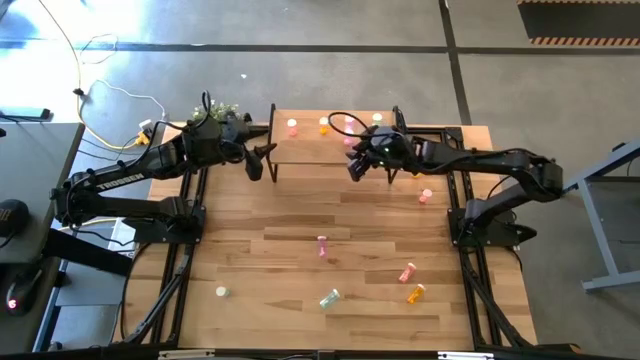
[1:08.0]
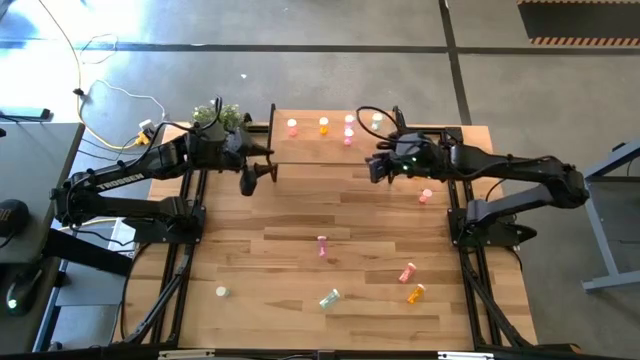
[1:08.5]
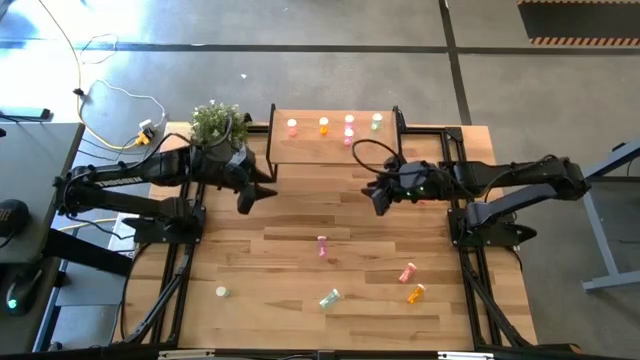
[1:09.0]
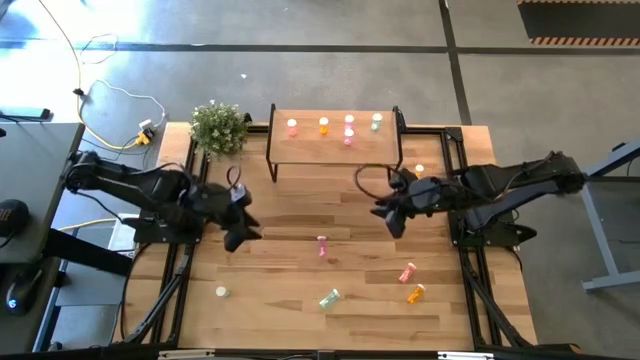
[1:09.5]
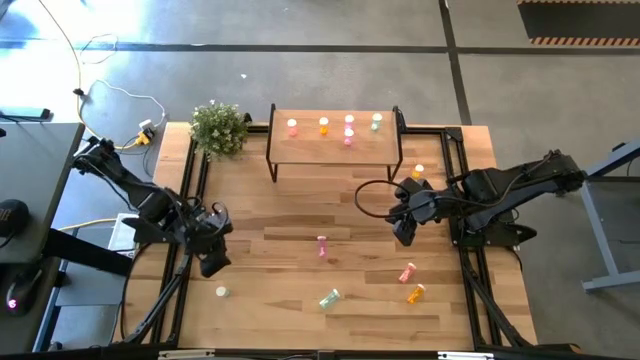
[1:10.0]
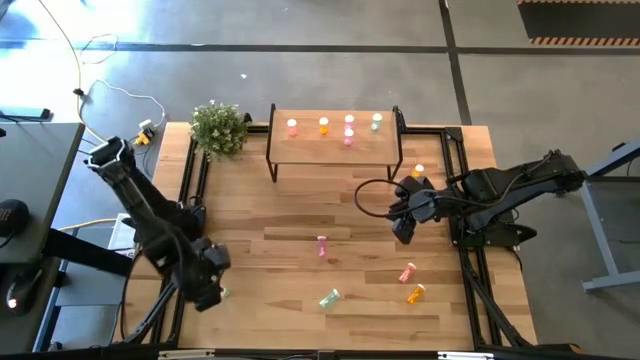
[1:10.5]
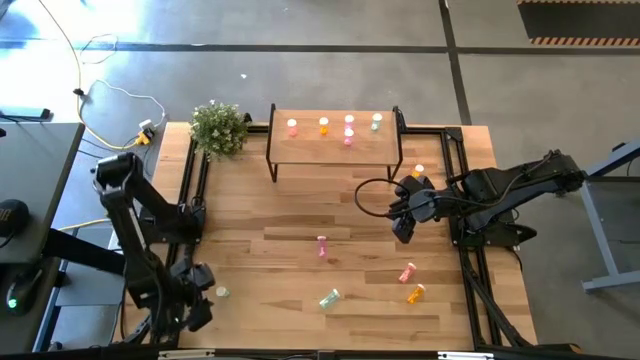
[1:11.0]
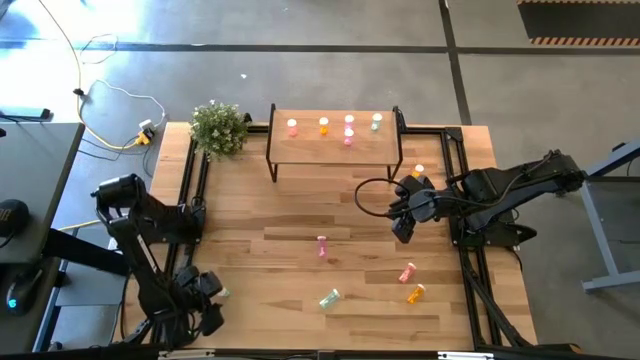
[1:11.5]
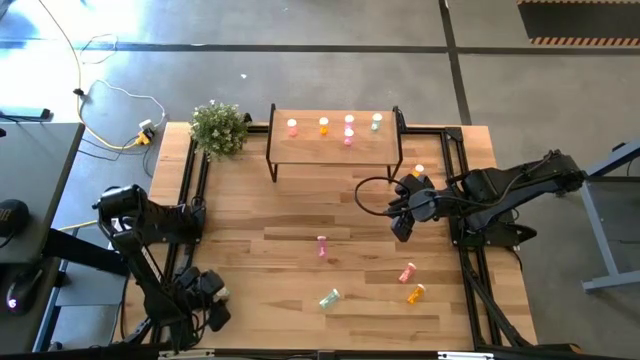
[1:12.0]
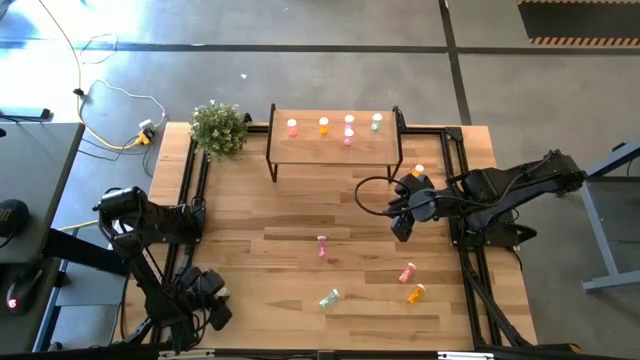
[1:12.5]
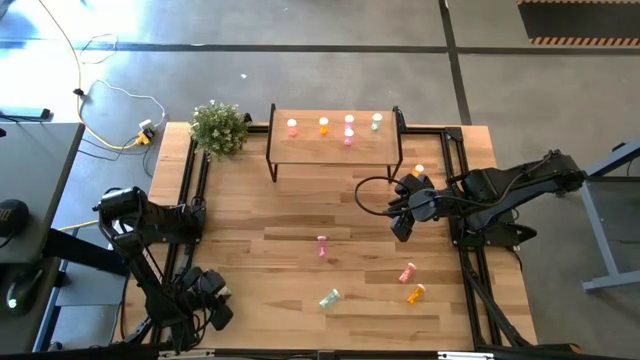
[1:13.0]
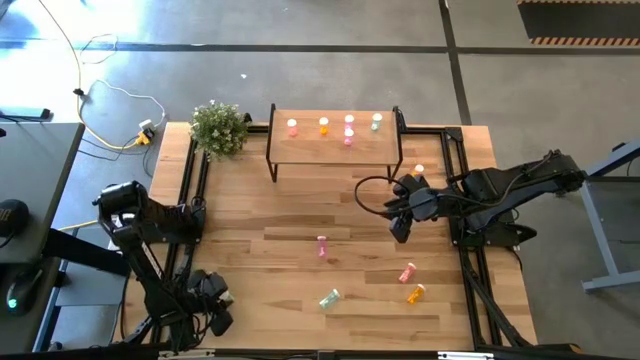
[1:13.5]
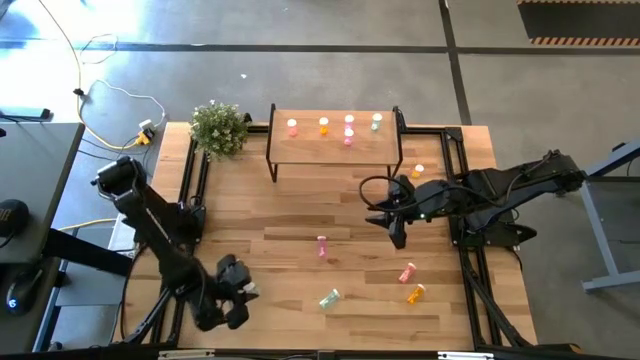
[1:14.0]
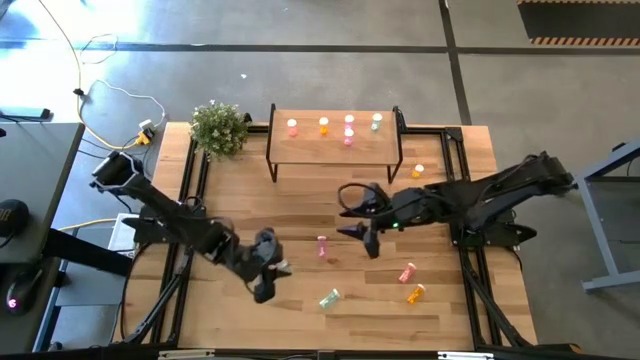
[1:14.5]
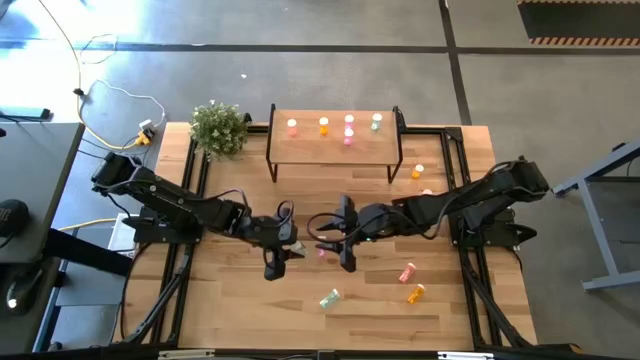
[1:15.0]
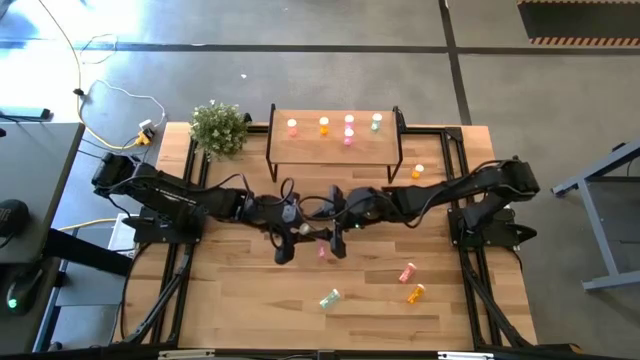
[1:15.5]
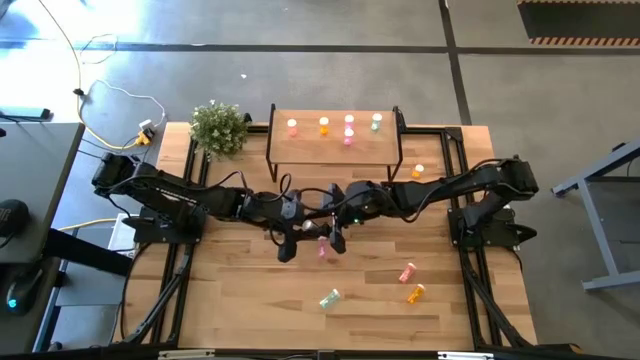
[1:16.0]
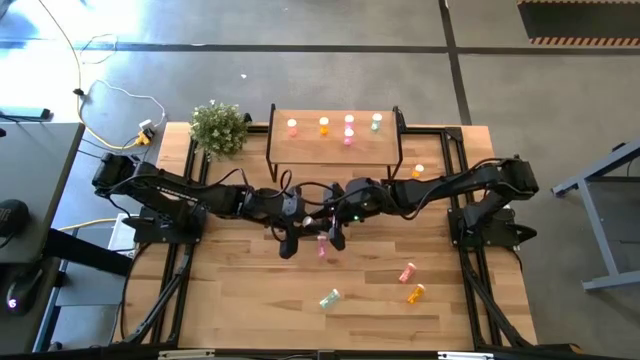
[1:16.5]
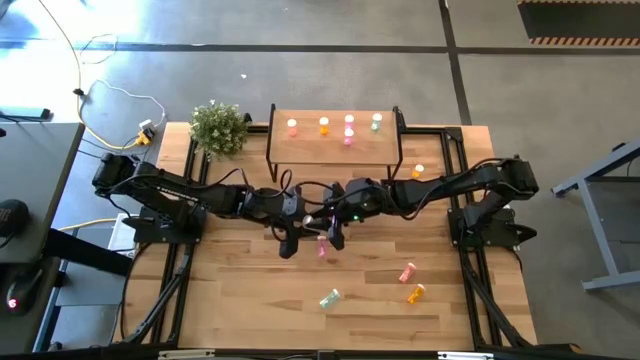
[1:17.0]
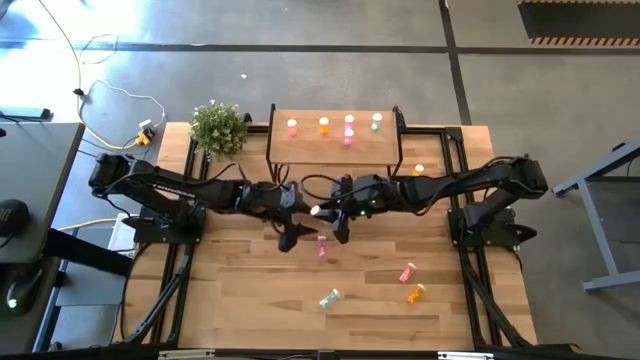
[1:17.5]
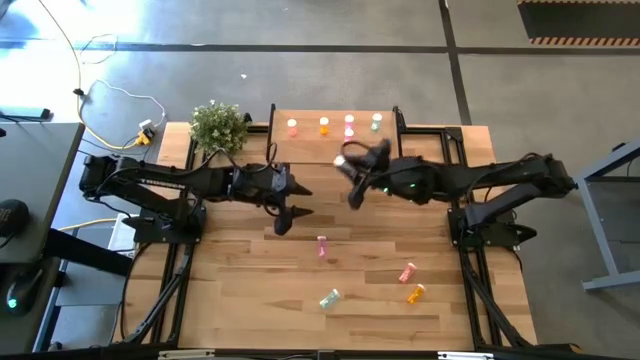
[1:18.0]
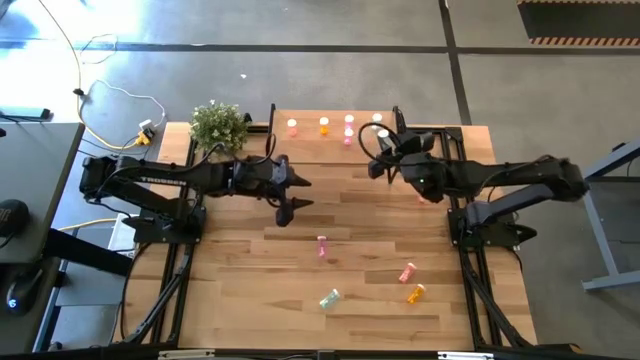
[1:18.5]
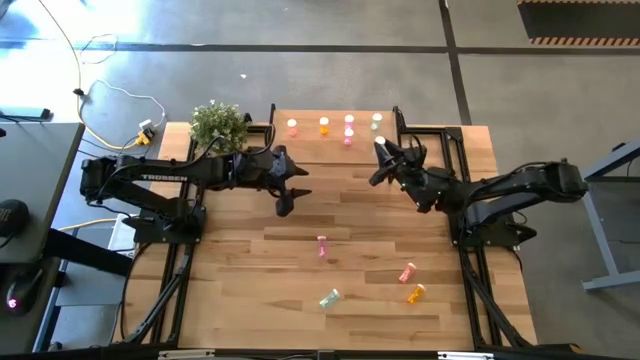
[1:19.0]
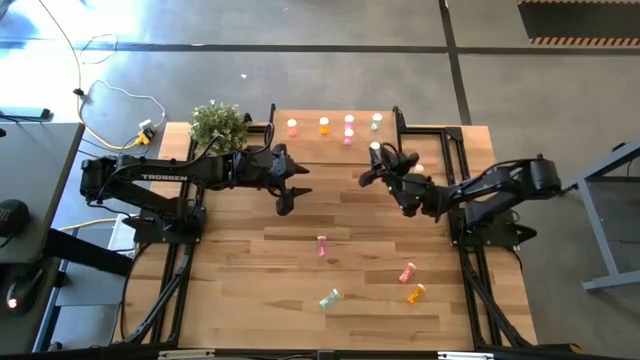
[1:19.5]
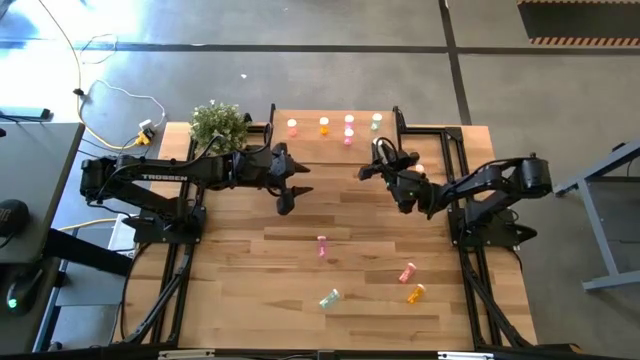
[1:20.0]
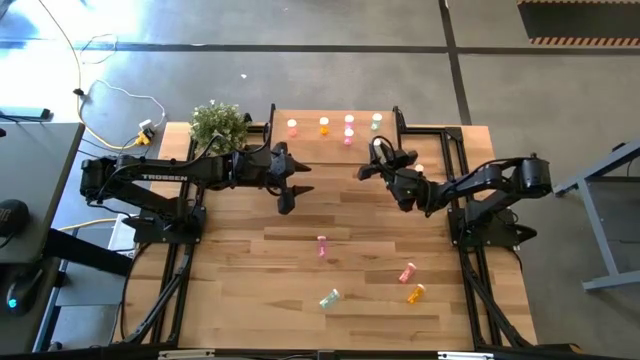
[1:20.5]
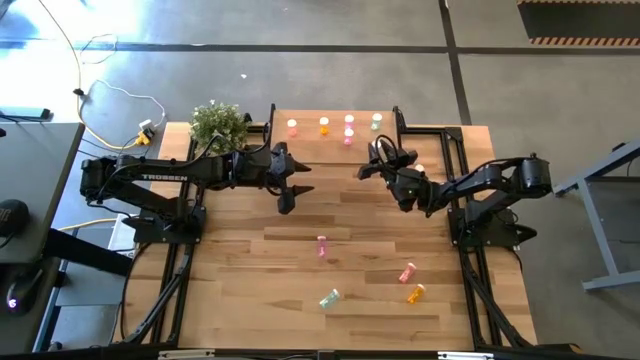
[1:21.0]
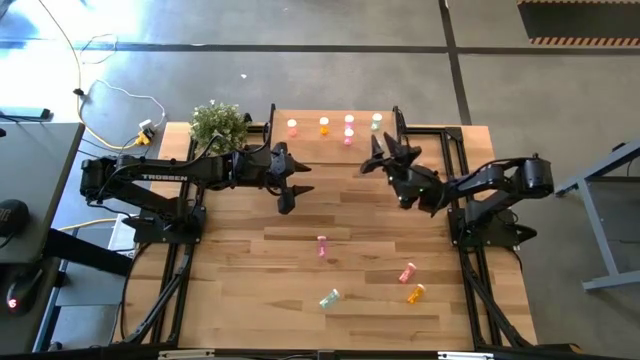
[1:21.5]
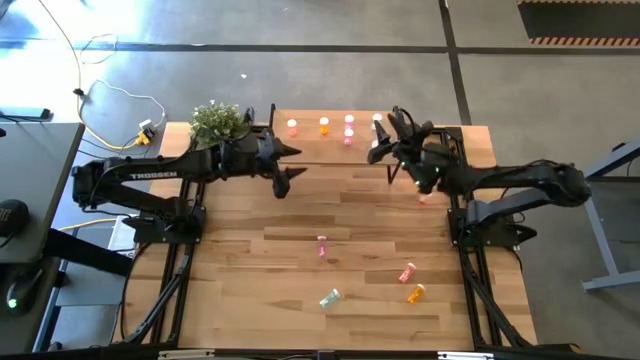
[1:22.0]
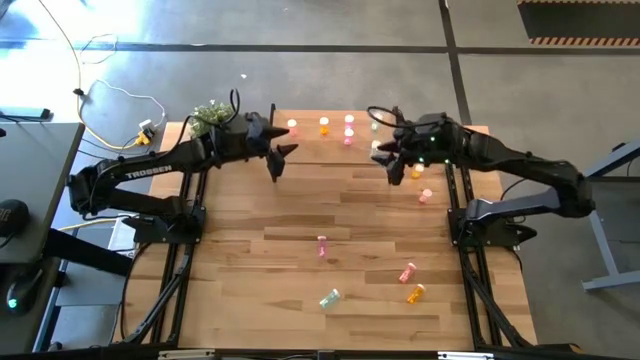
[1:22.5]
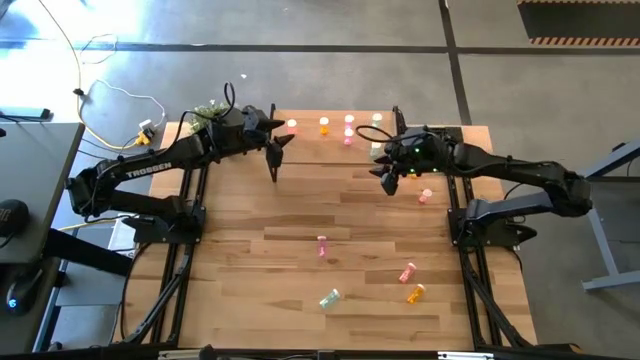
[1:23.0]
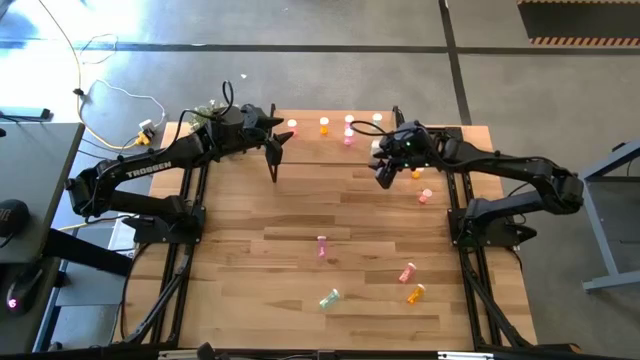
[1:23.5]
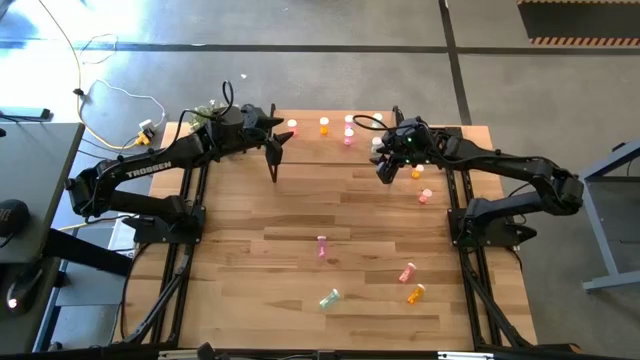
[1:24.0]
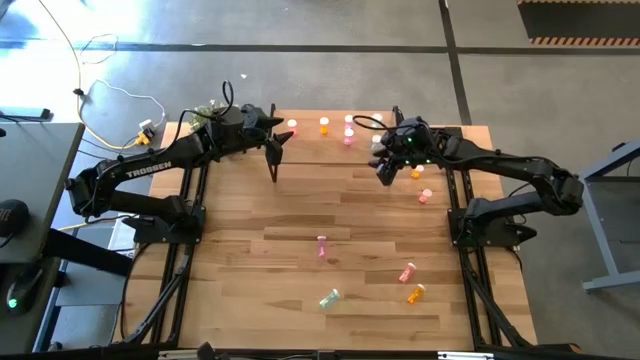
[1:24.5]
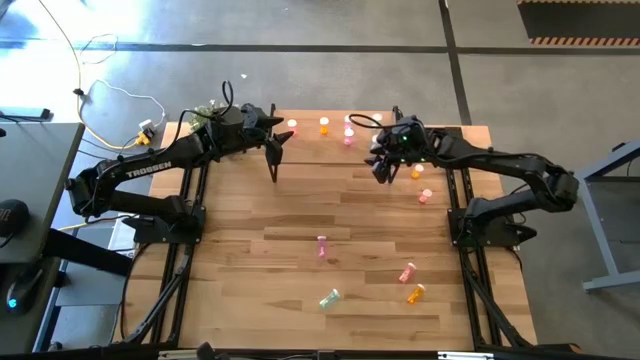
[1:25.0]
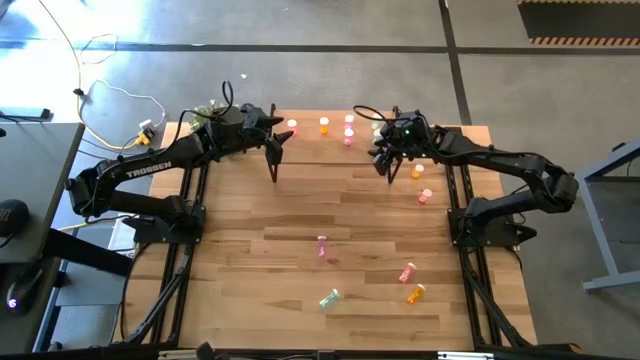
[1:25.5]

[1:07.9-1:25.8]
Task: Pick and place medicine bottles onto shelf by color
Put the left blue pill bottle on the shelf aligned with the other blue pill bottle

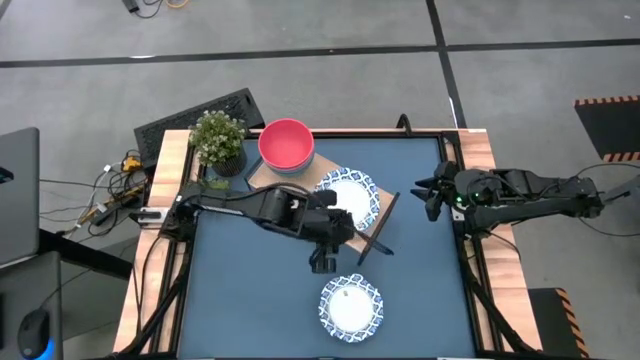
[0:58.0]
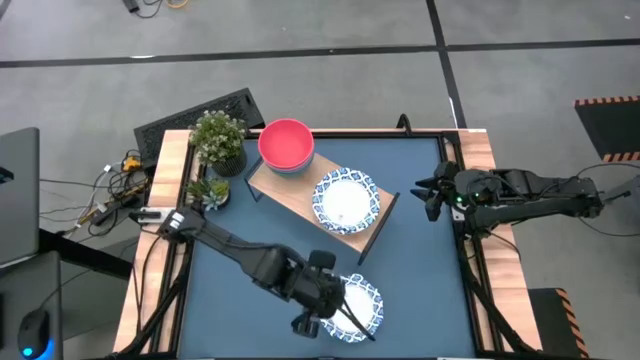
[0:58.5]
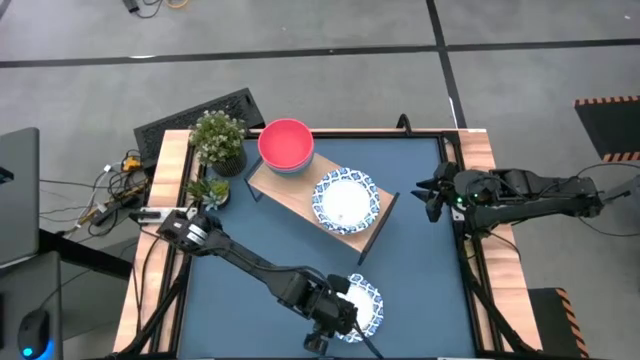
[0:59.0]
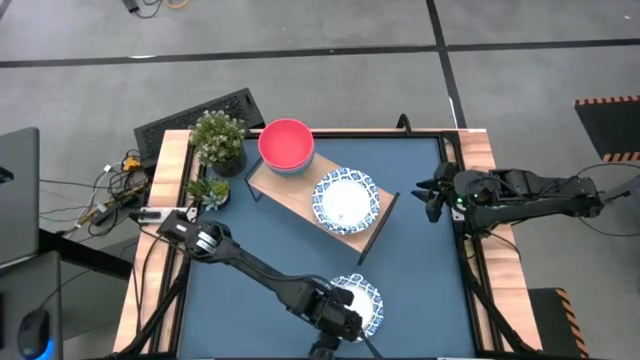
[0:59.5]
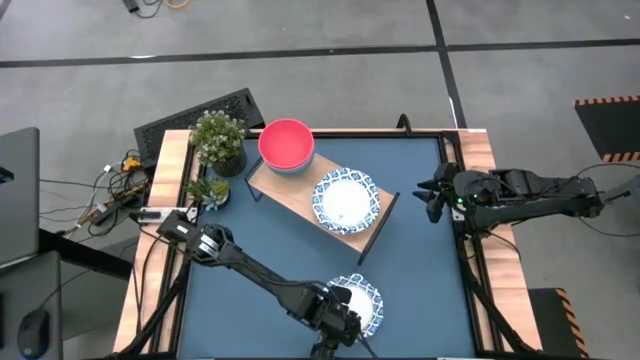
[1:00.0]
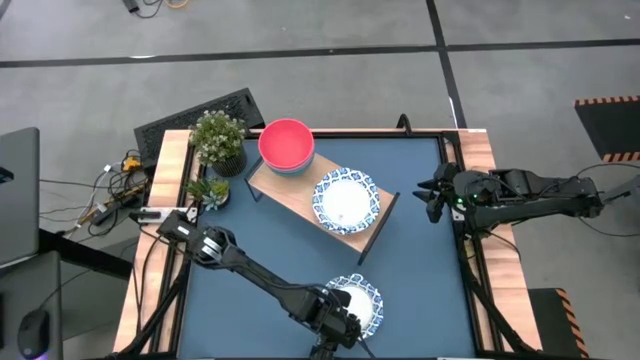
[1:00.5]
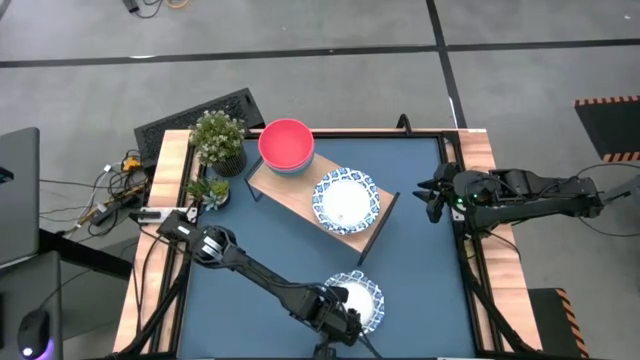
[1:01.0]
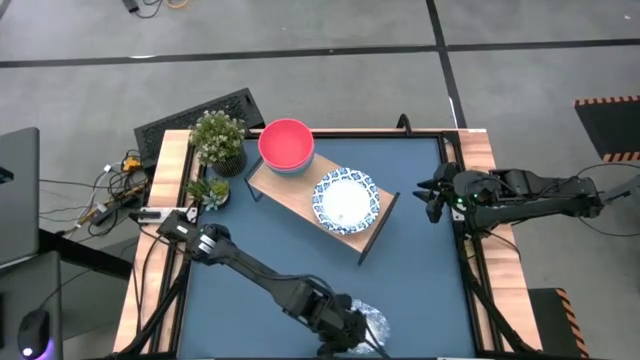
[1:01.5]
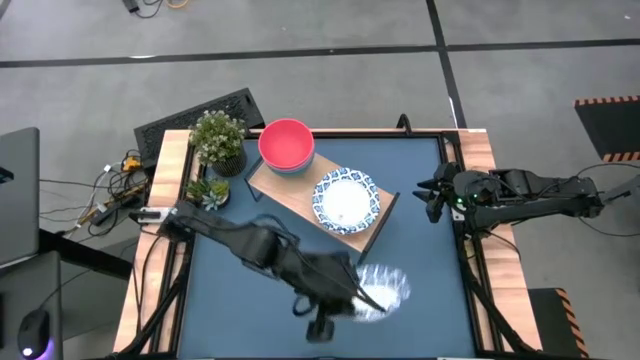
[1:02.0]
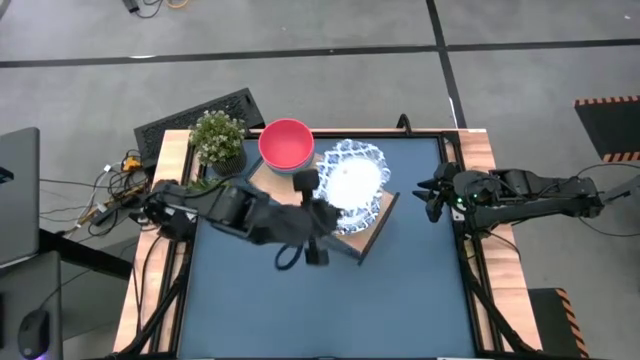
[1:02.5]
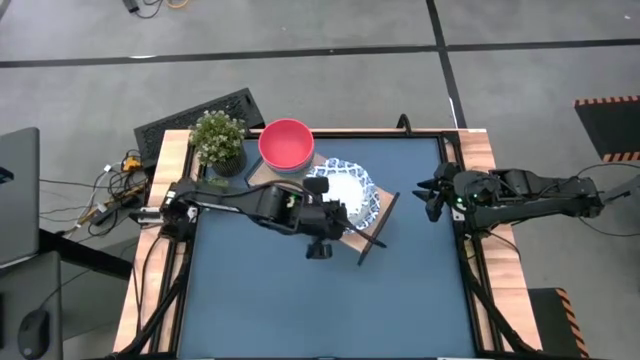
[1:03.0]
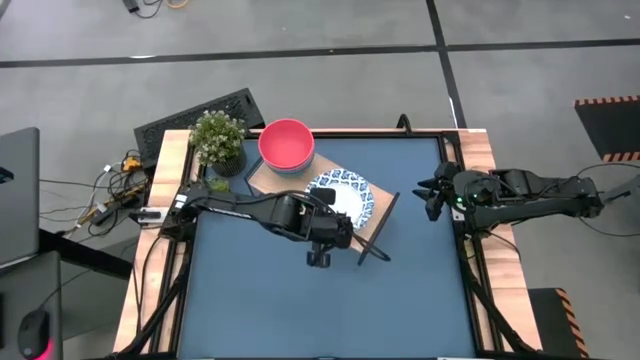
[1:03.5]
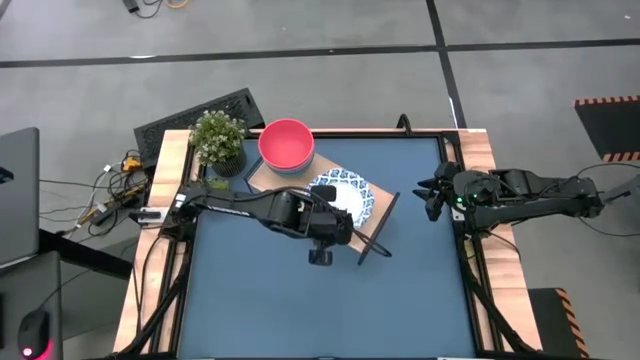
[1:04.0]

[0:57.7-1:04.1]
Task: Place and stack bowls onto a shelf
Stack the white bowl on top of the white bowls on the shelf
